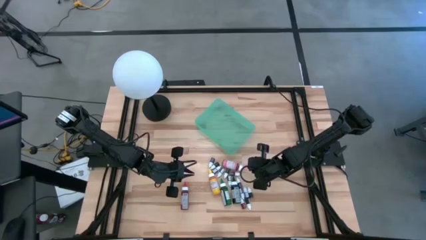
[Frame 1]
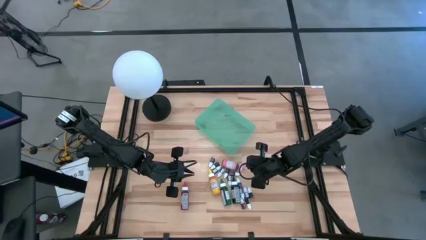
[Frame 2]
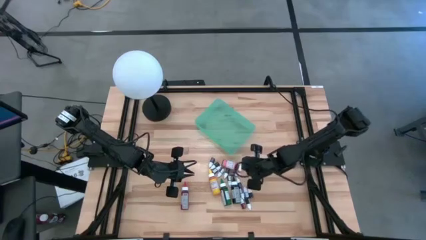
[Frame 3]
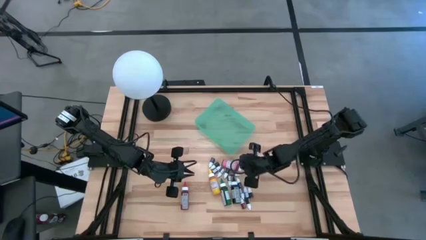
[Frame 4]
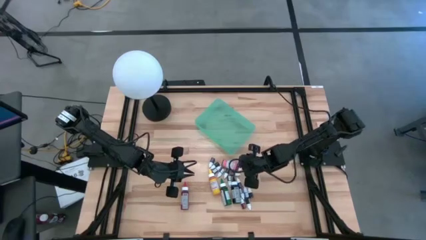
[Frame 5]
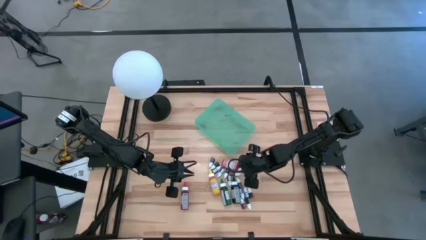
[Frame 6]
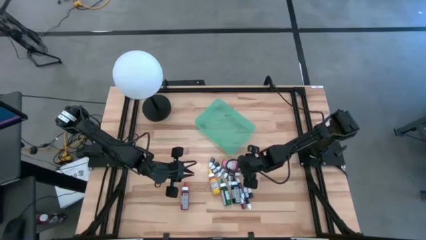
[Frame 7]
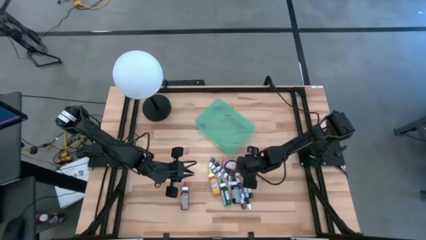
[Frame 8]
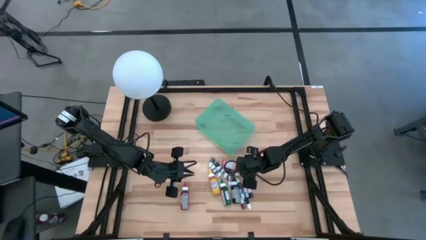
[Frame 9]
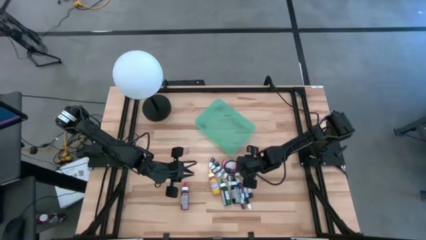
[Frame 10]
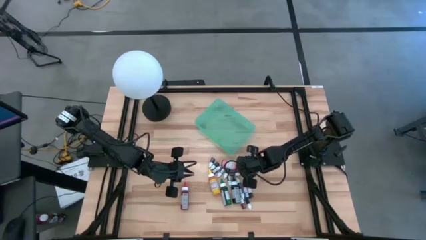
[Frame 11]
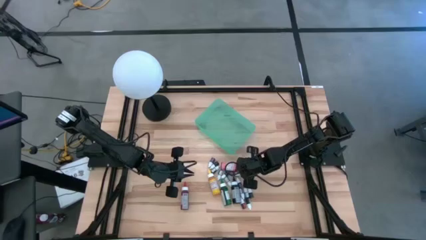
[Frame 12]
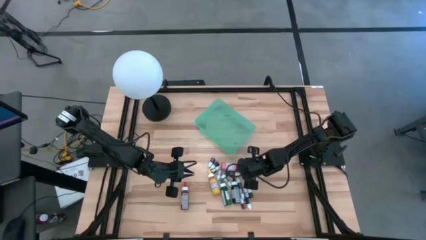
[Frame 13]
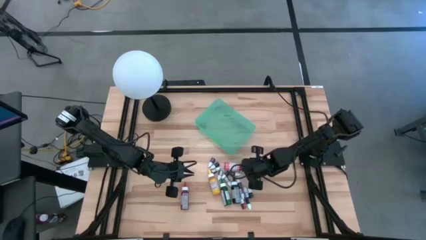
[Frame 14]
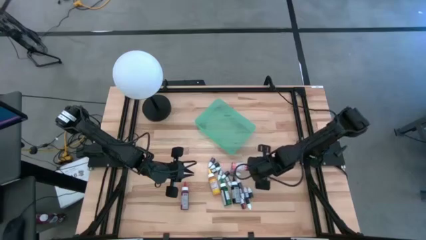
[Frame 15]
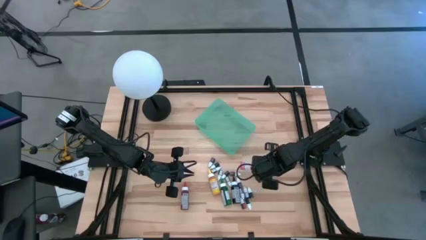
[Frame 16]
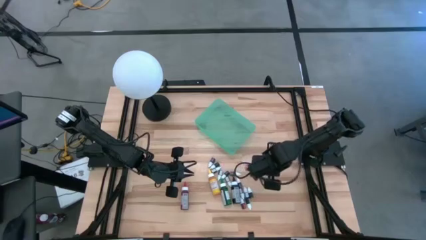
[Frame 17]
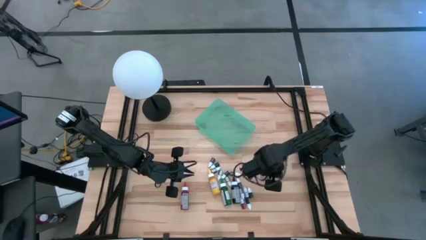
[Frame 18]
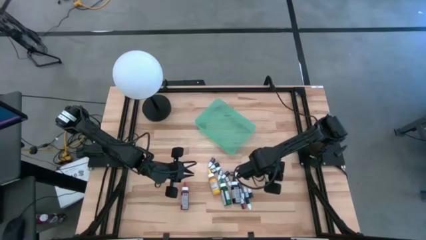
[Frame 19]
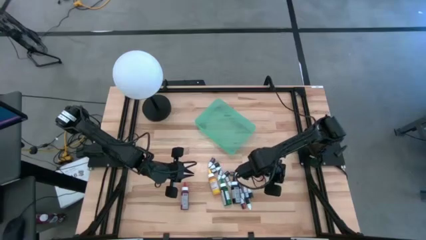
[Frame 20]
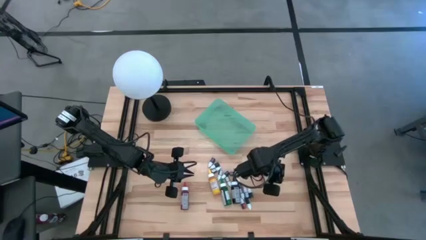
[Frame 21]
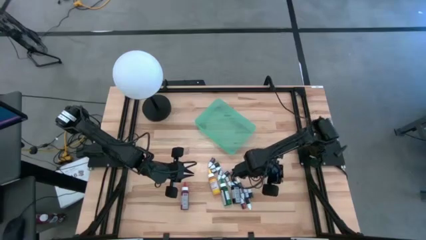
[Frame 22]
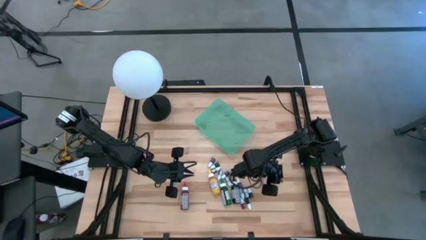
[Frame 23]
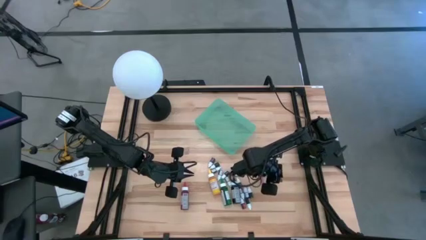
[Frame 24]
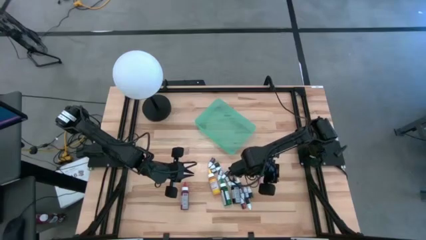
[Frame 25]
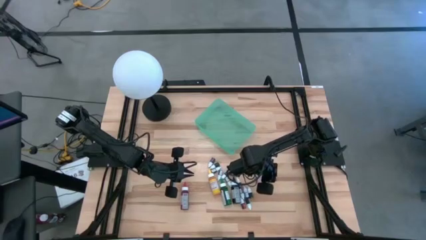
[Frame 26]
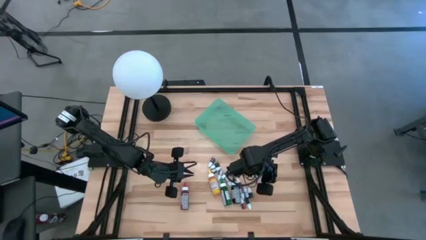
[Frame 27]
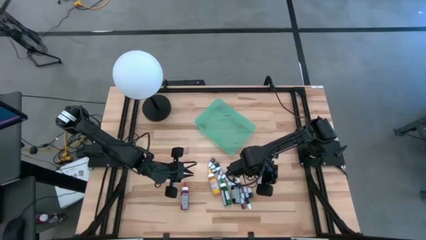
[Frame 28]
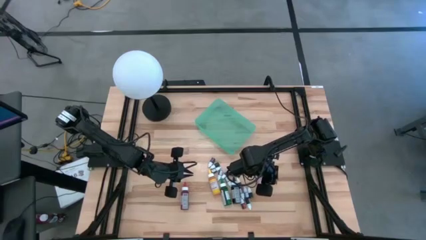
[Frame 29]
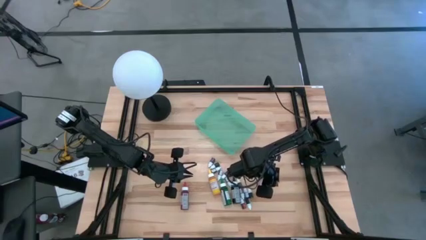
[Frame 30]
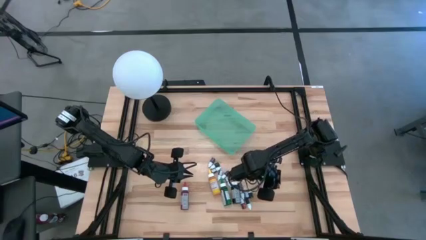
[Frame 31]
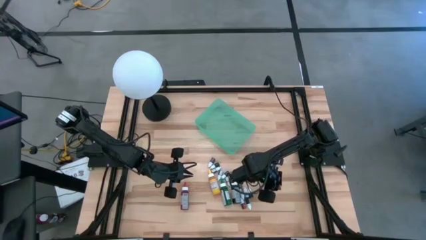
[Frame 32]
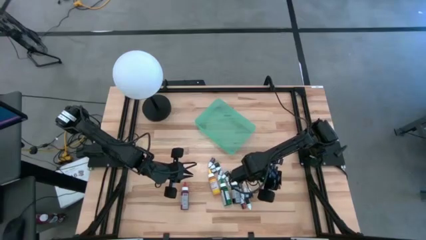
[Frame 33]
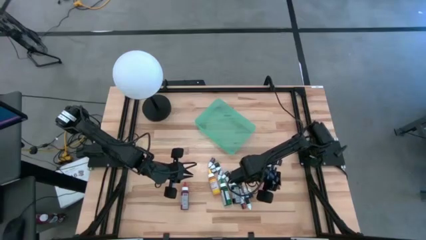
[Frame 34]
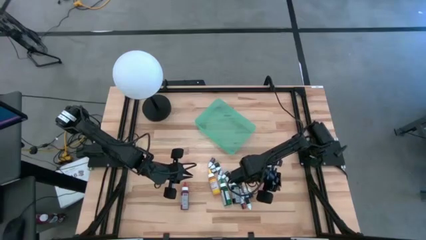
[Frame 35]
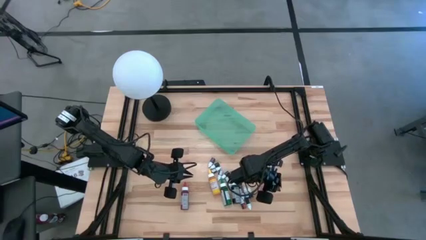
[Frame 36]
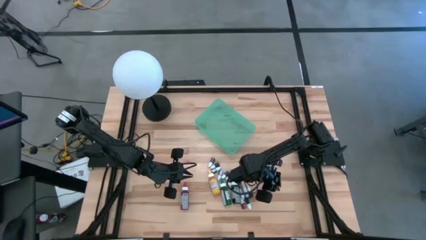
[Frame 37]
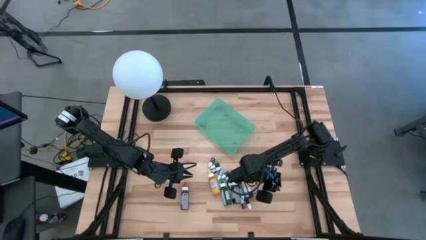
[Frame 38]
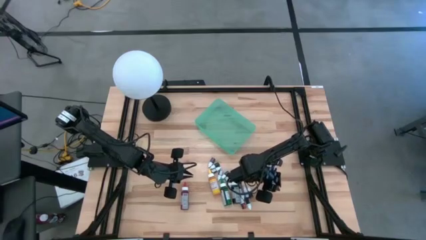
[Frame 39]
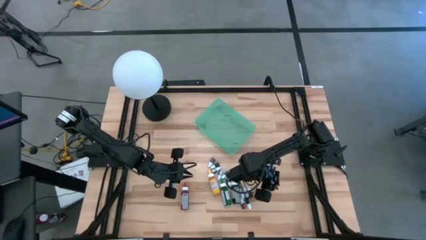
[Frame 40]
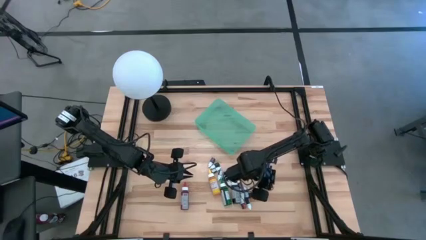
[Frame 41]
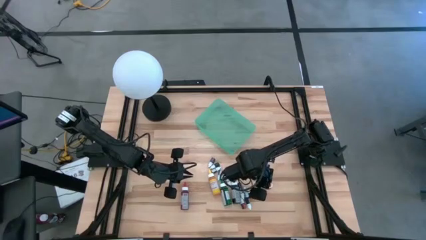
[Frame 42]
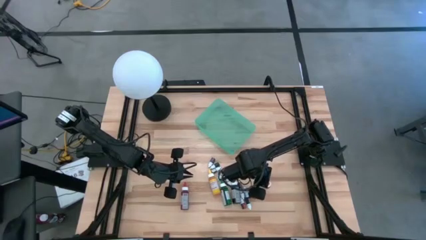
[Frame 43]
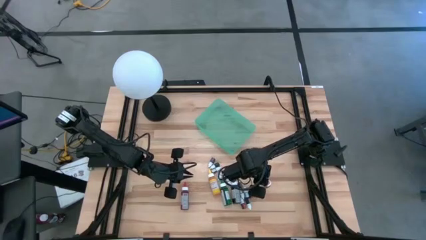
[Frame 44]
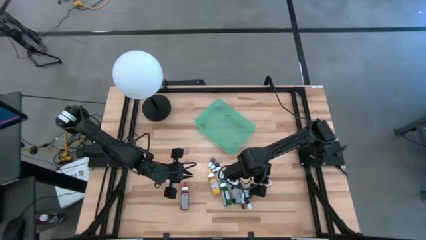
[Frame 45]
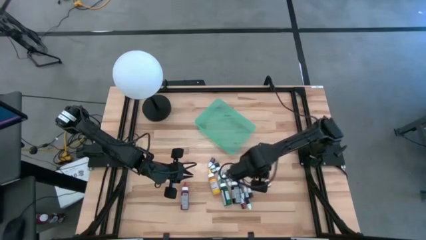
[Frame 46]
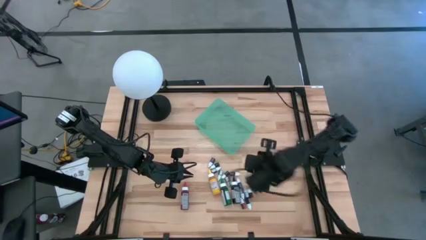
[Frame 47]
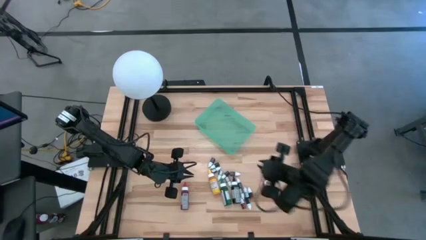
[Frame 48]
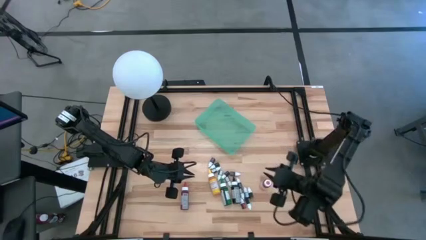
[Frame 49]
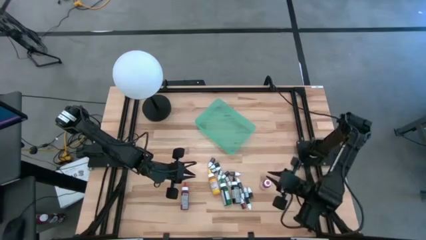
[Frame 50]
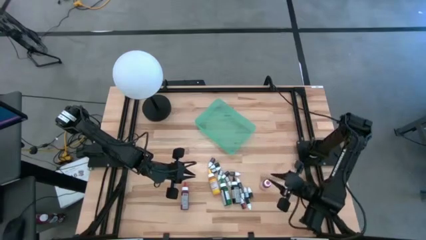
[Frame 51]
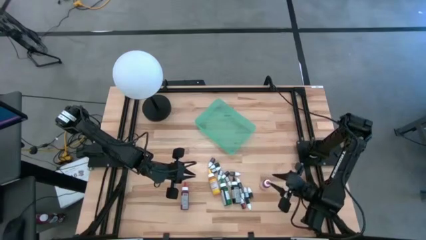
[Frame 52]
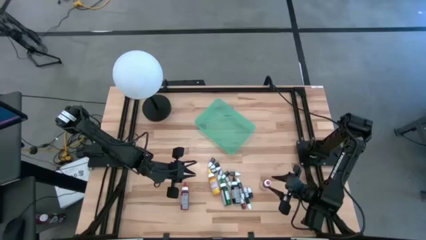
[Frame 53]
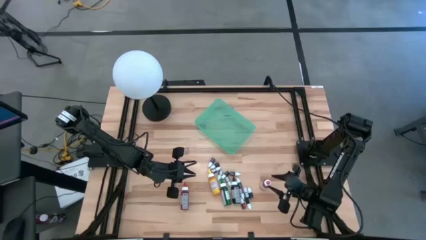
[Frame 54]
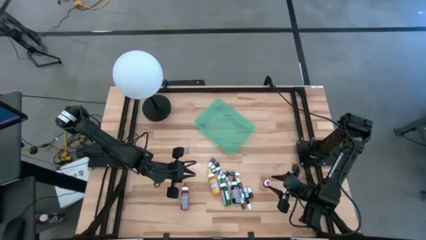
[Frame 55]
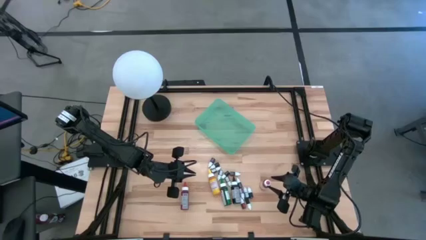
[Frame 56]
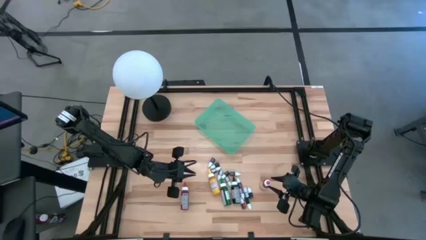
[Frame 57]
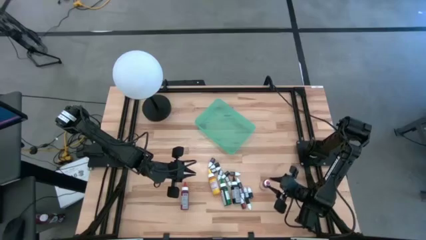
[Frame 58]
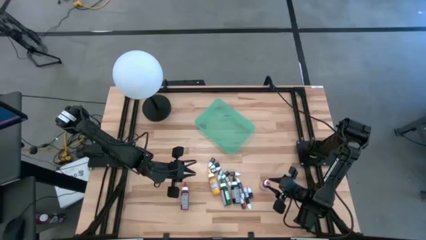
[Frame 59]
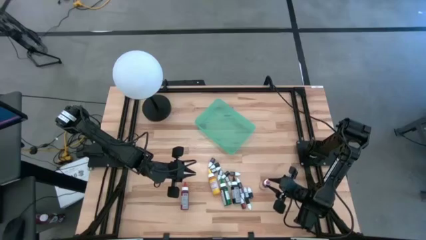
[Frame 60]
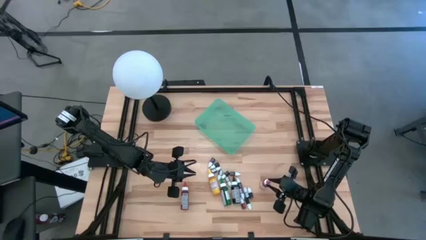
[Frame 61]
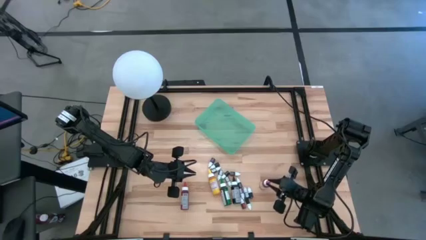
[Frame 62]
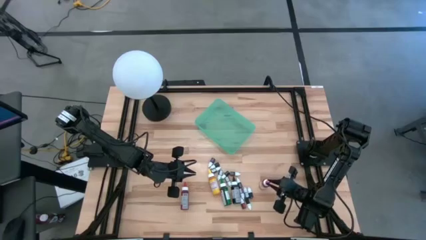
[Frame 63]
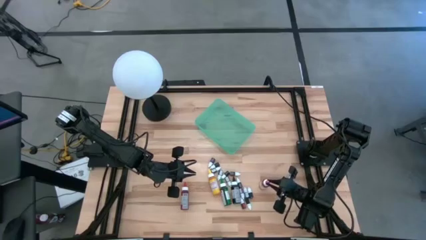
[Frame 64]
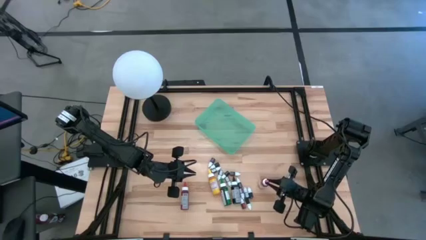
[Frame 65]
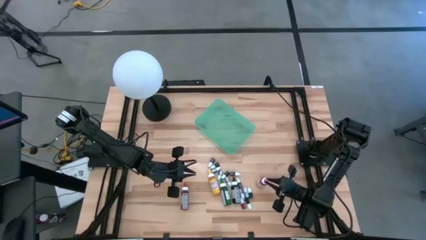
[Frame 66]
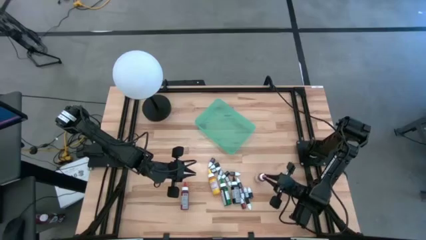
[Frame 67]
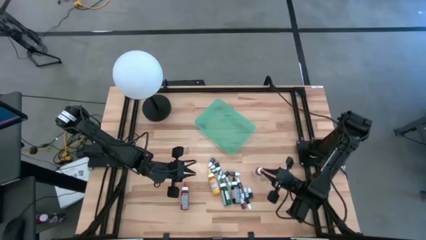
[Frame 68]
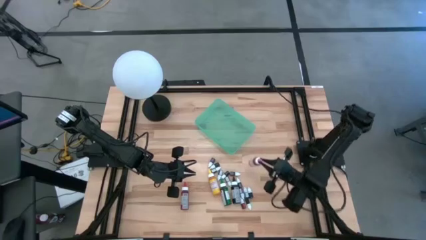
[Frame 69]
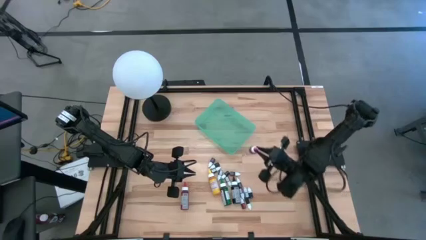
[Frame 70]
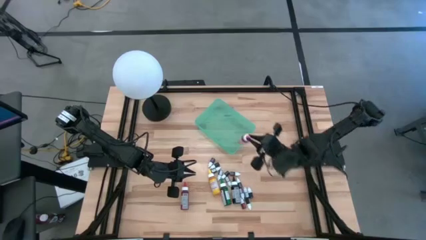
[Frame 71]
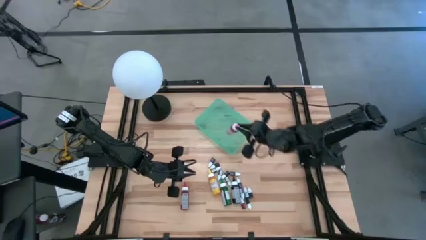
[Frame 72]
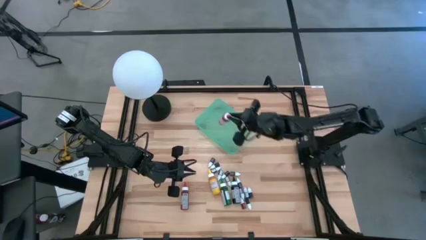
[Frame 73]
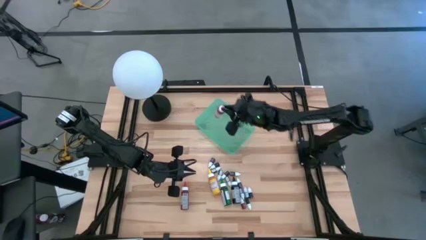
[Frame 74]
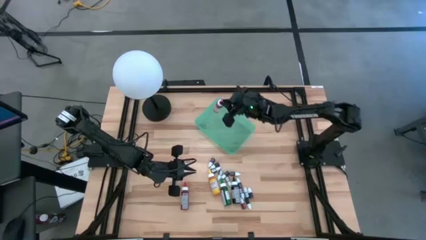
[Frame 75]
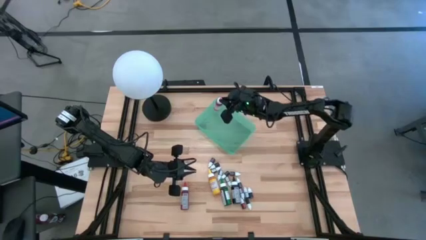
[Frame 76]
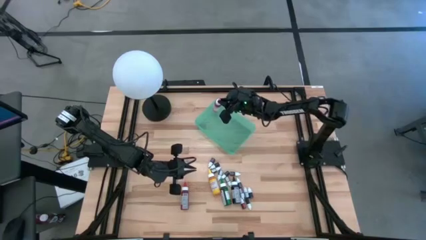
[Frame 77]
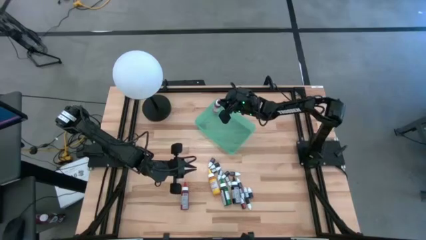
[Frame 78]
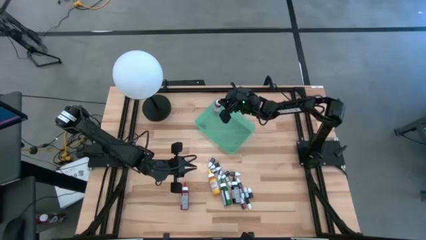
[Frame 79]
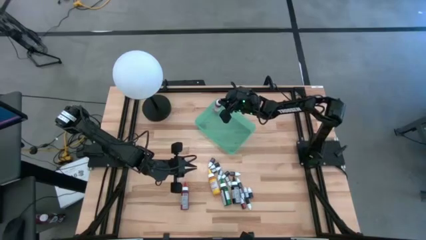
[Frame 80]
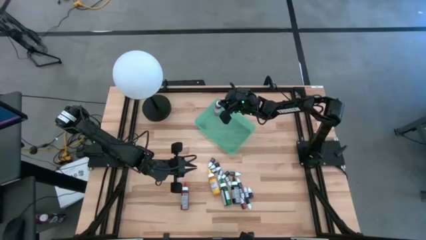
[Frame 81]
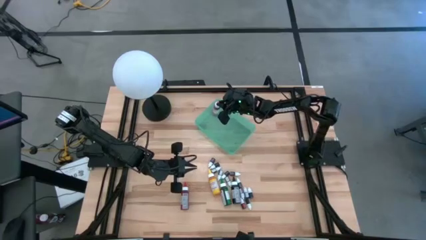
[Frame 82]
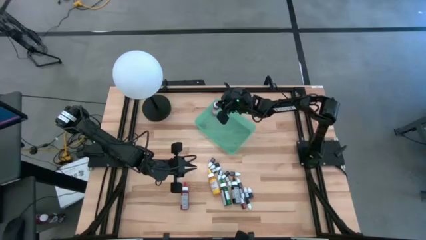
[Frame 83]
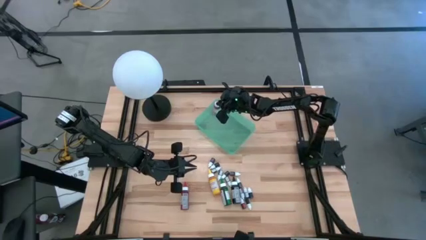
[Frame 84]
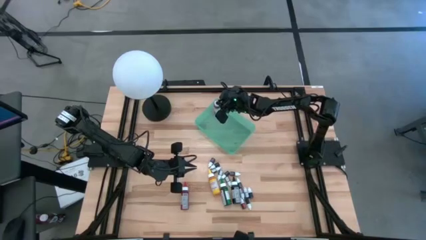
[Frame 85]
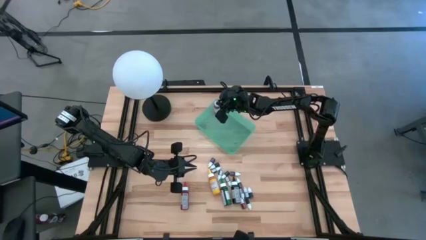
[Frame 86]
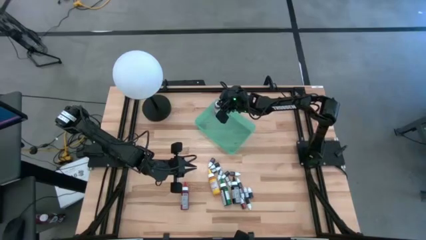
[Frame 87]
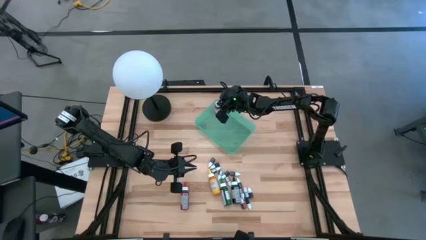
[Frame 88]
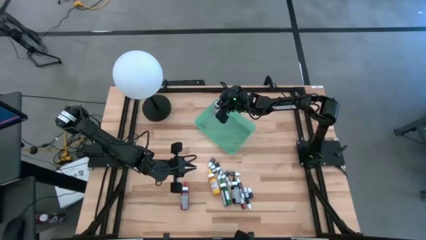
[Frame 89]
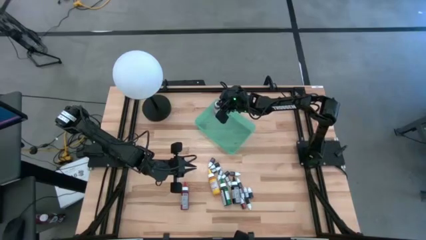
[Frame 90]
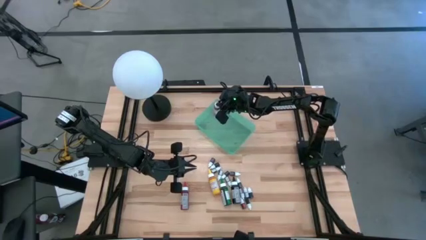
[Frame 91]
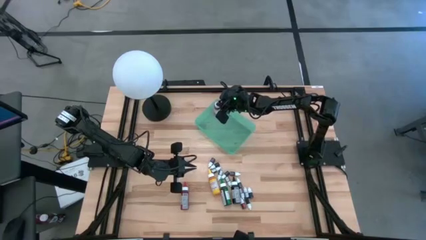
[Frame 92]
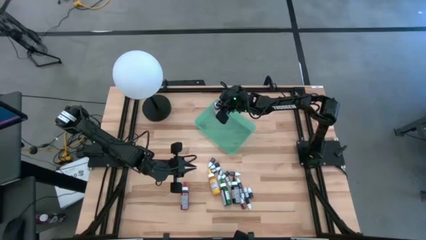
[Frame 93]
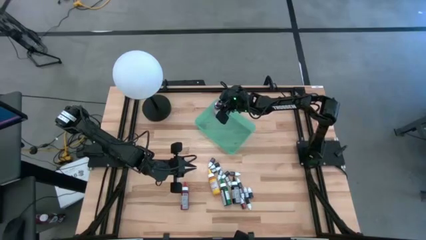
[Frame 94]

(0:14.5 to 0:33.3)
Task: Pick & Place food coloring
Put the large pink food coloring bottle into the green bin
